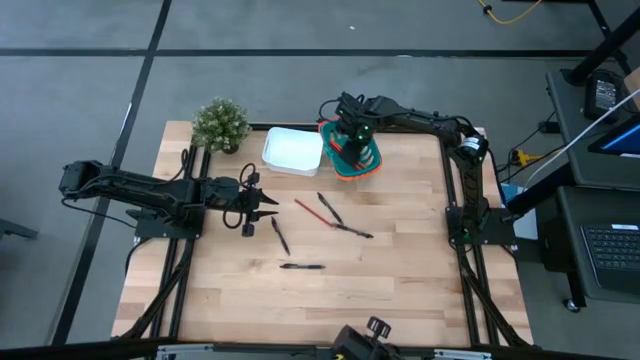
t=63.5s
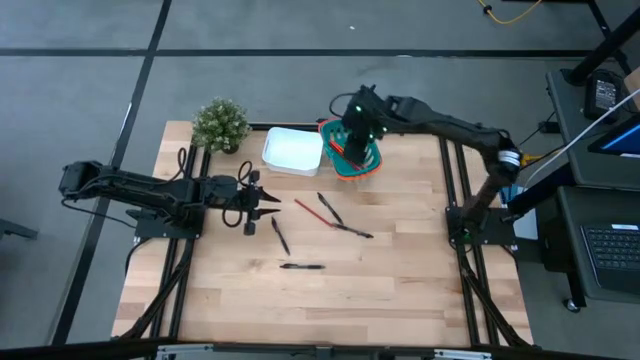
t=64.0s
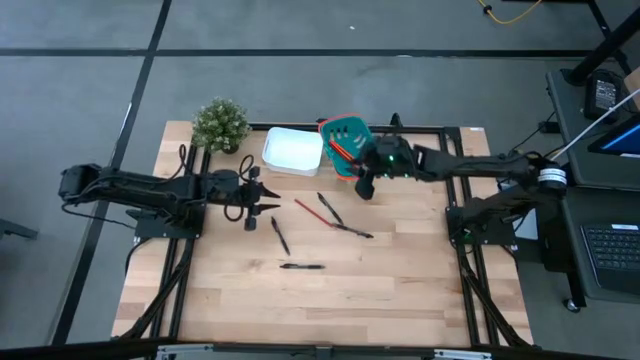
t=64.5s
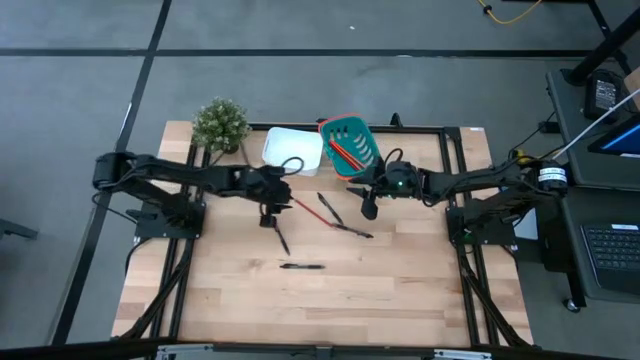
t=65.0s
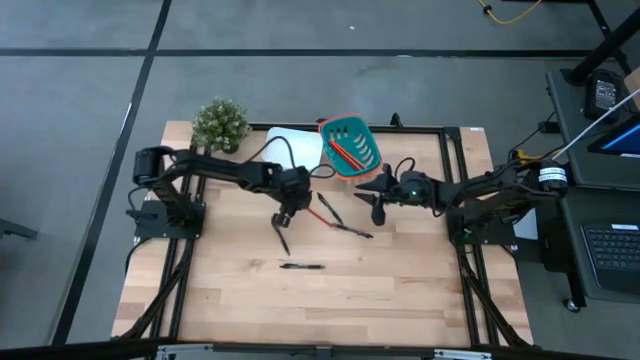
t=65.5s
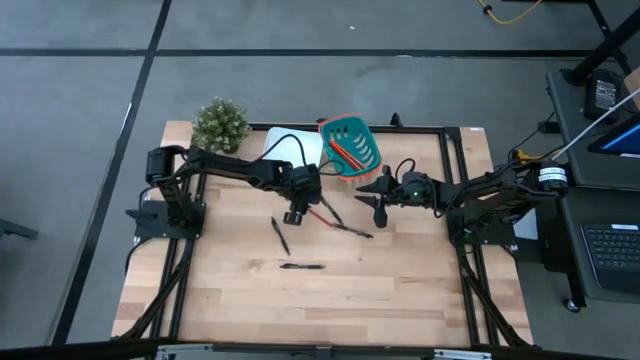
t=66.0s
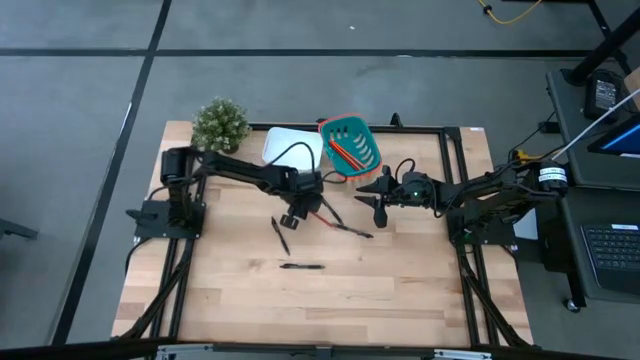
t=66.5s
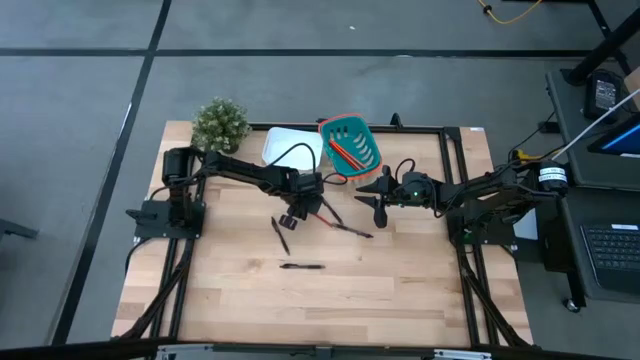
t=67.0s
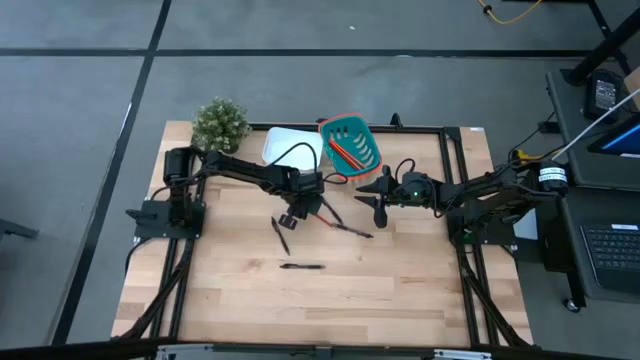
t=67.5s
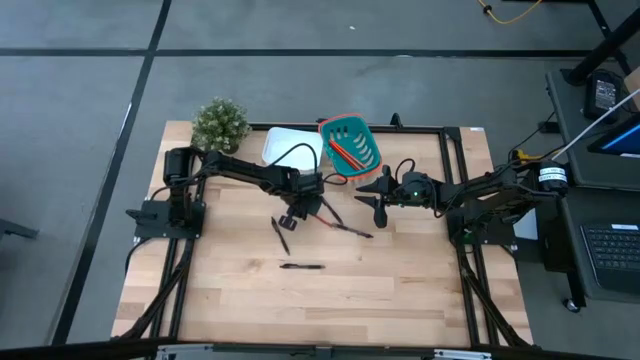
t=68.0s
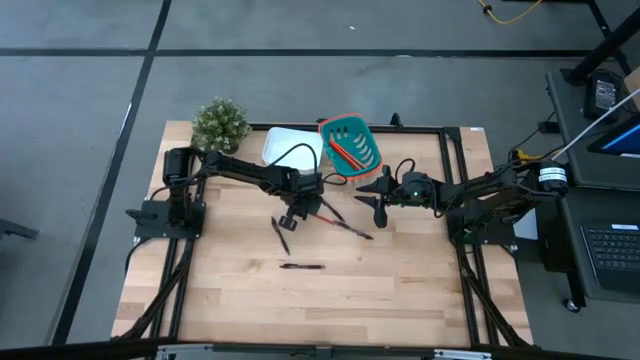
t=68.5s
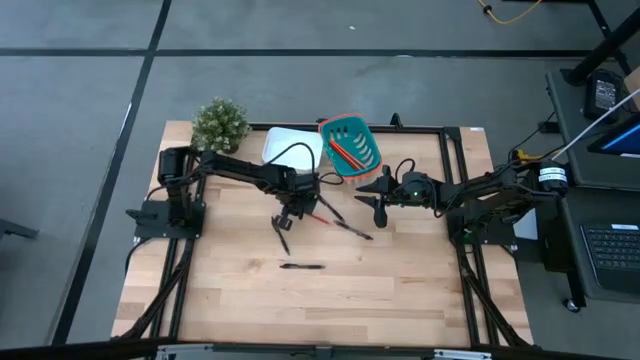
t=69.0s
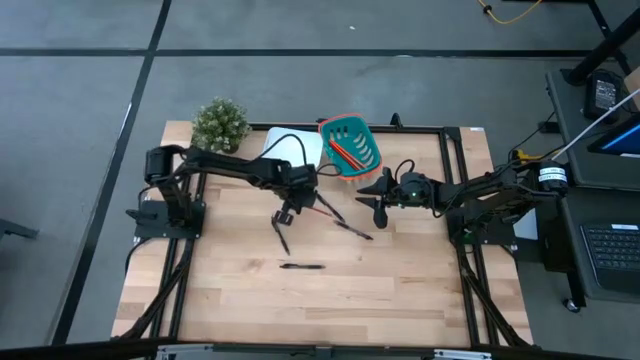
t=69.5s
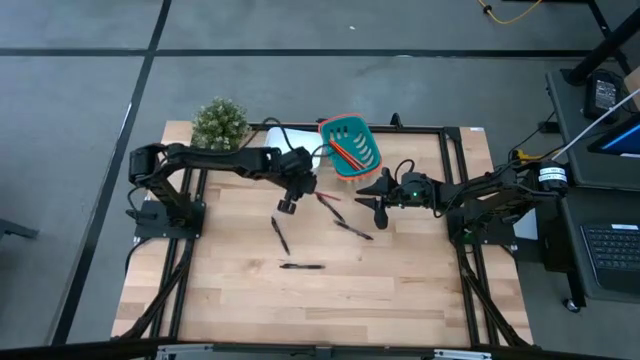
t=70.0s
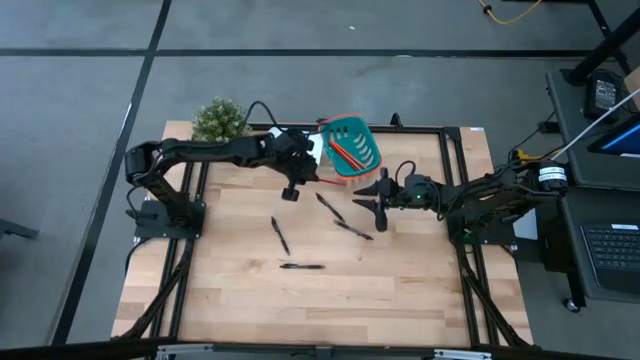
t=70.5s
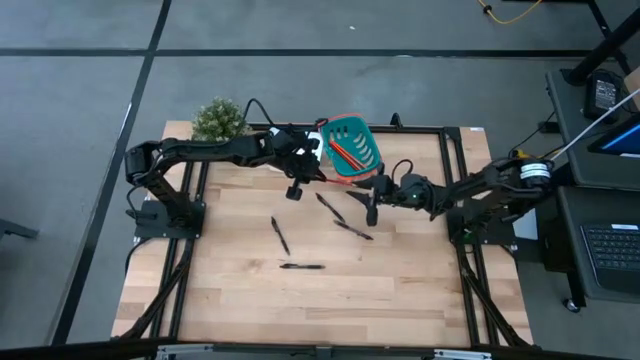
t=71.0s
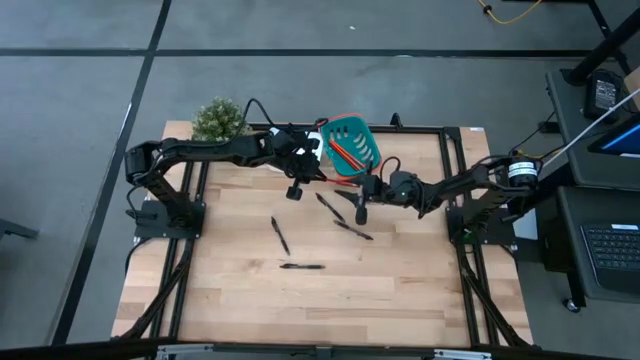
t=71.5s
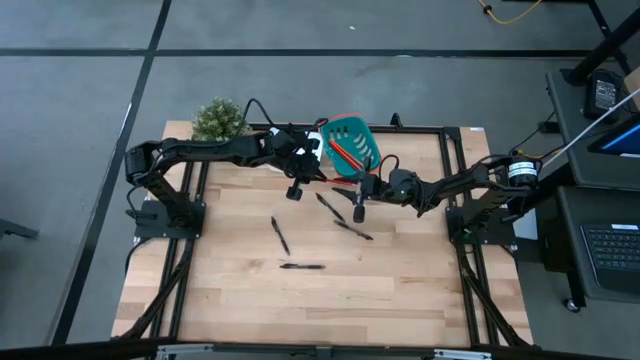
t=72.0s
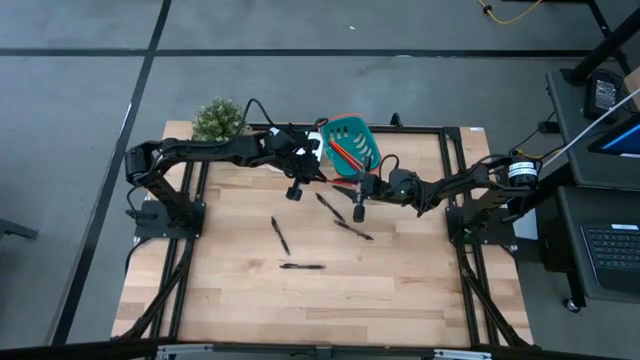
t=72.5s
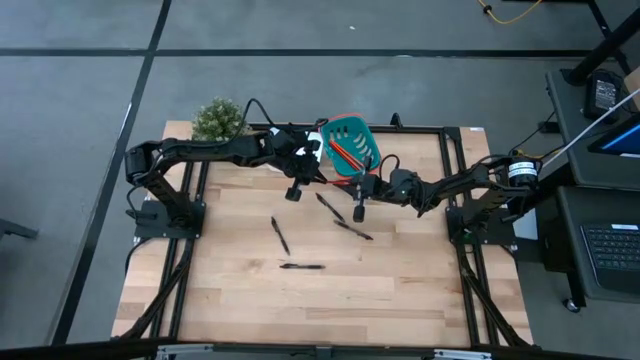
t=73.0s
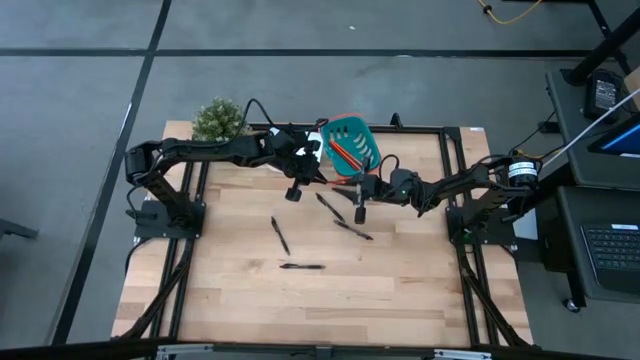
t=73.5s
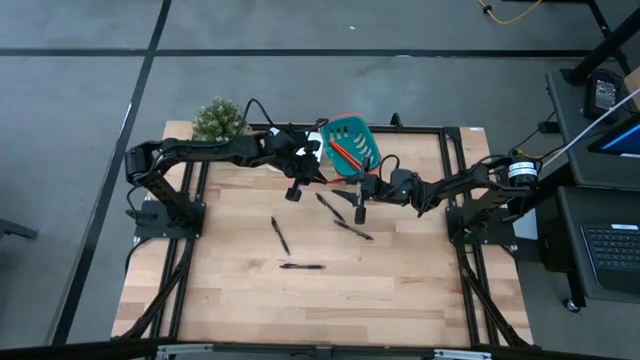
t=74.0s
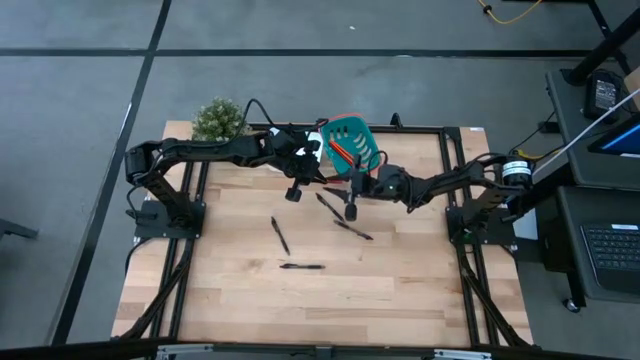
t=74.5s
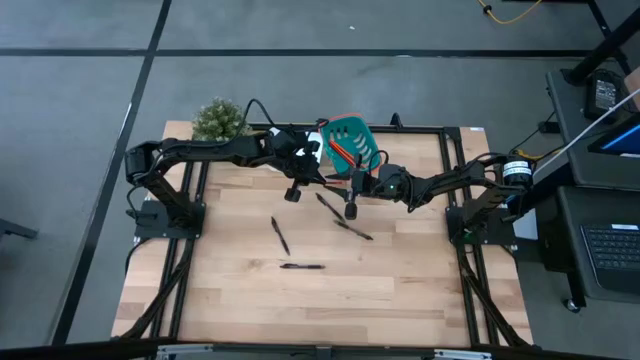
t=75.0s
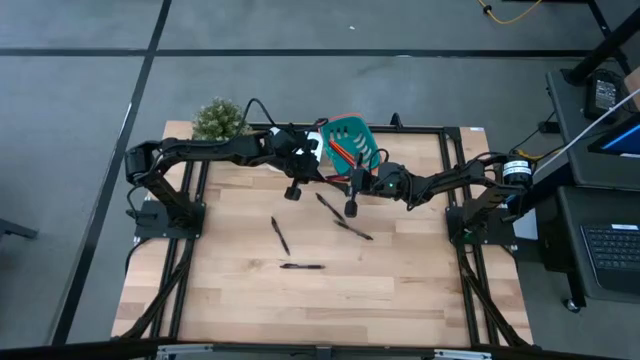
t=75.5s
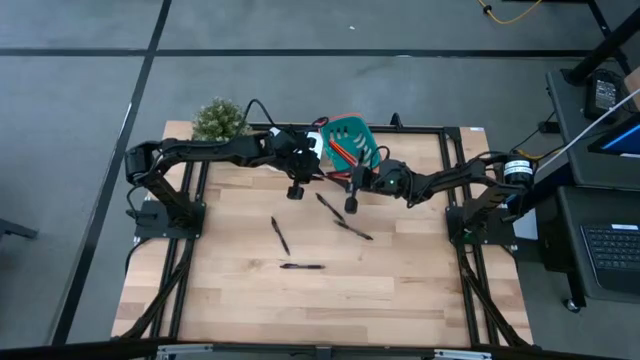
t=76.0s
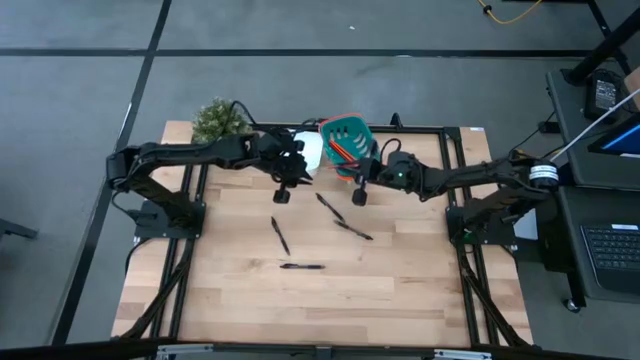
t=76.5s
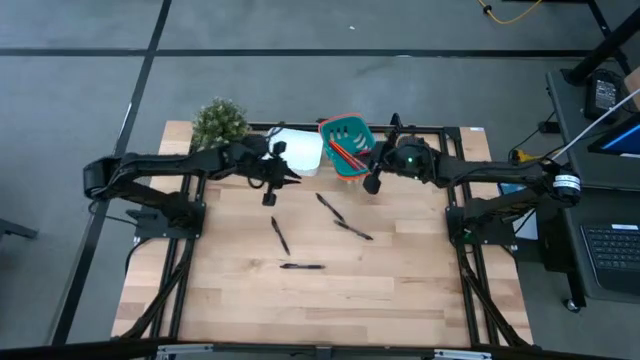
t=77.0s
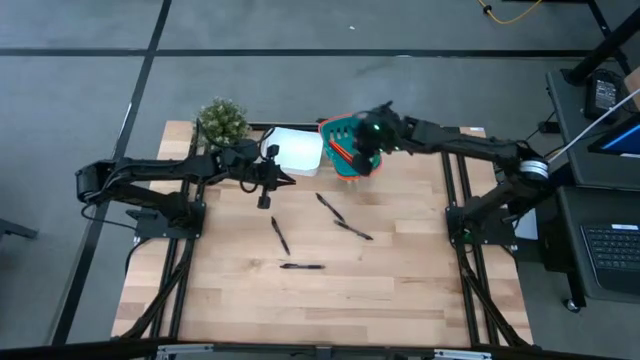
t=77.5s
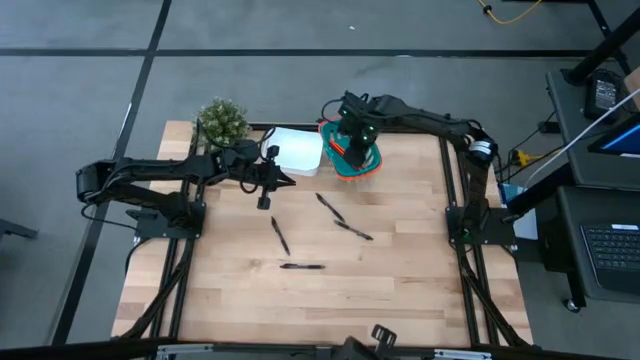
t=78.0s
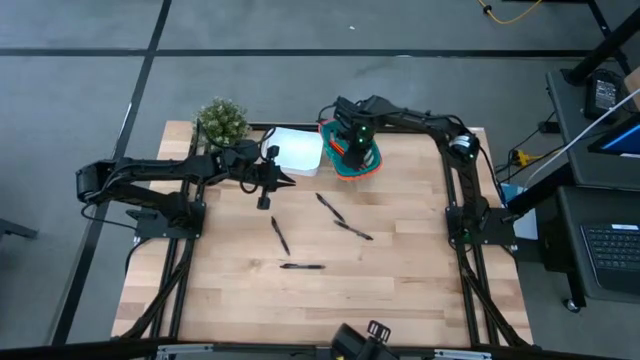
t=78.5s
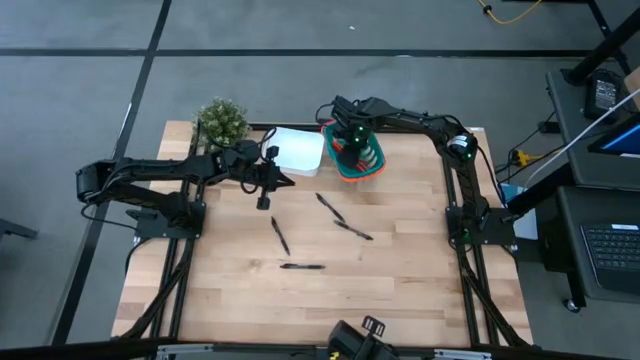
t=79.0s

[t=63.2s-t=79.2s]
Task: Sort pens & pencils
Put the red pencil into the dark green bin

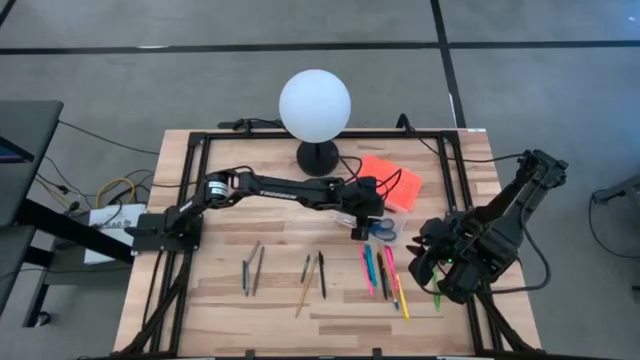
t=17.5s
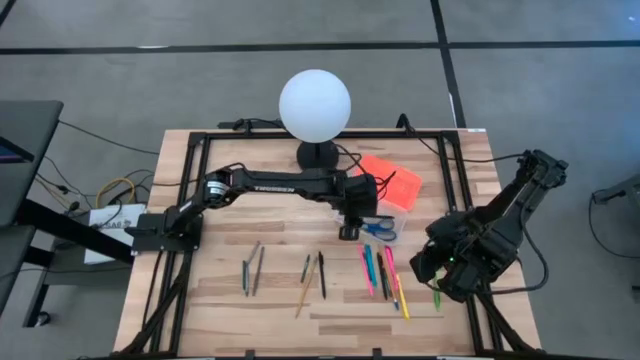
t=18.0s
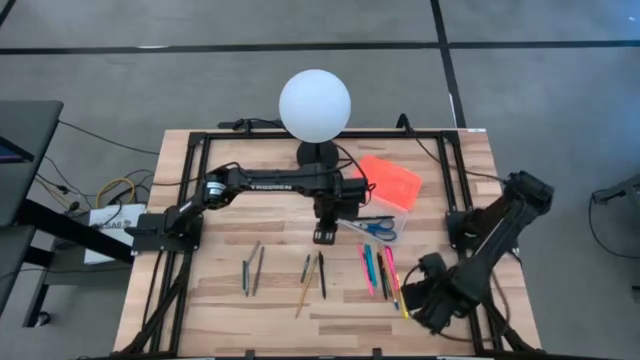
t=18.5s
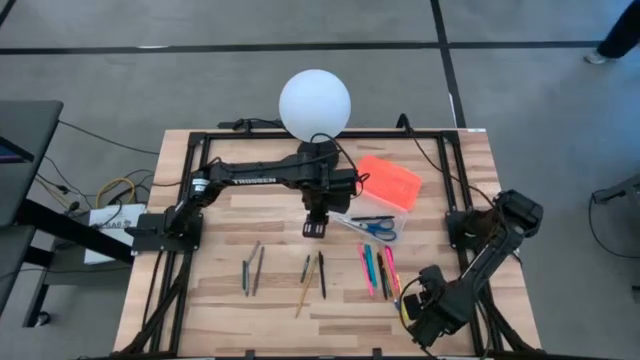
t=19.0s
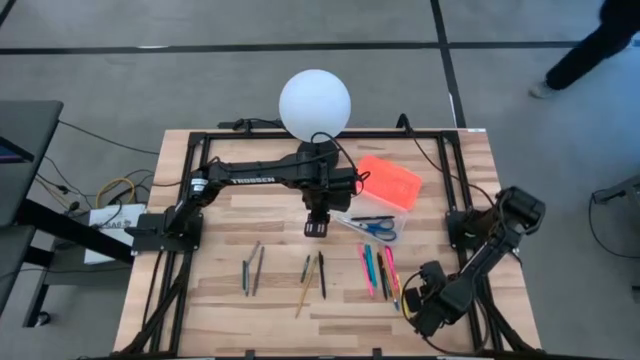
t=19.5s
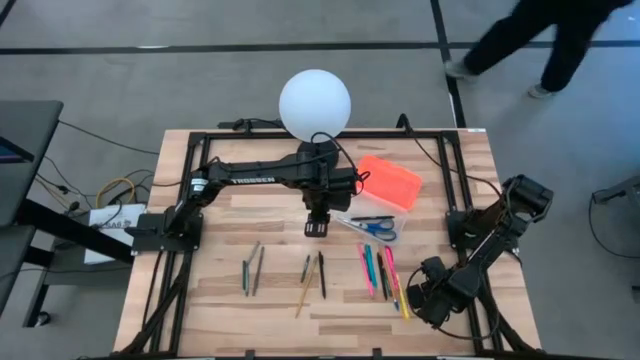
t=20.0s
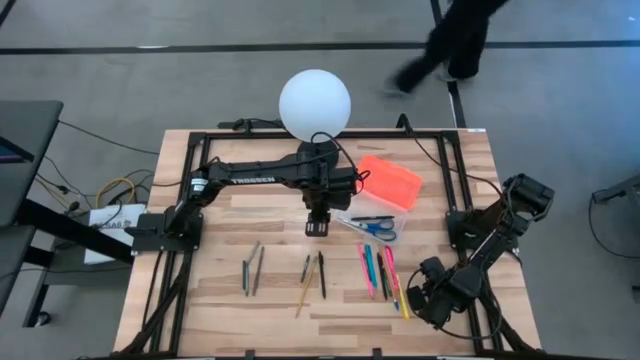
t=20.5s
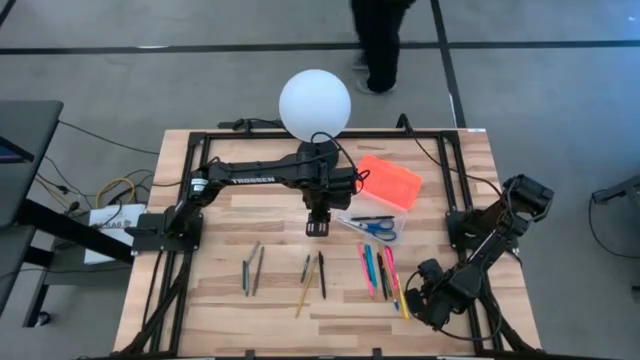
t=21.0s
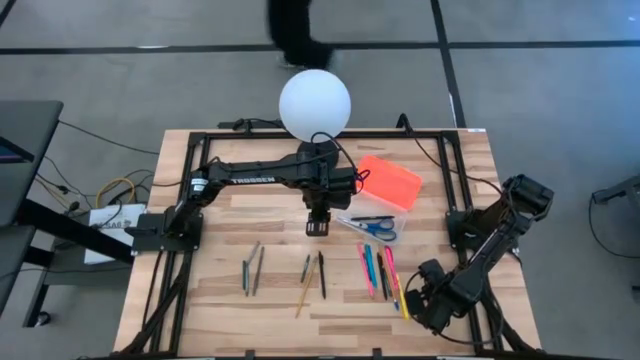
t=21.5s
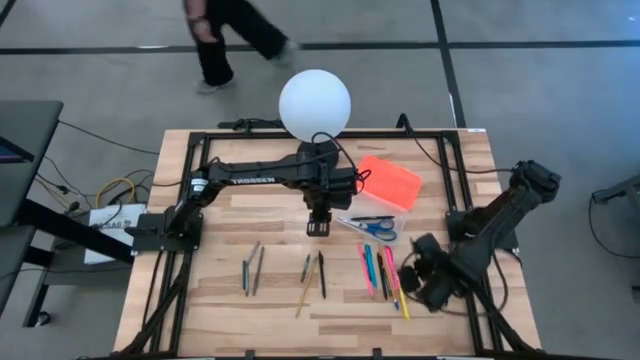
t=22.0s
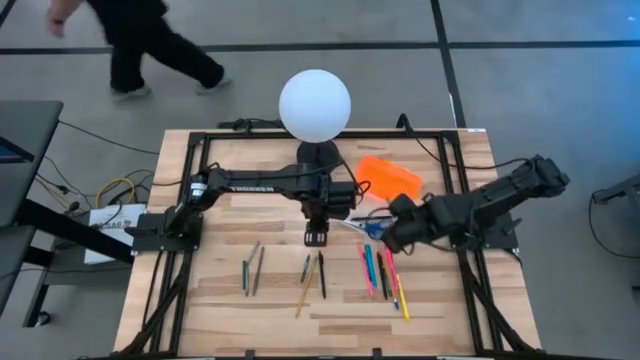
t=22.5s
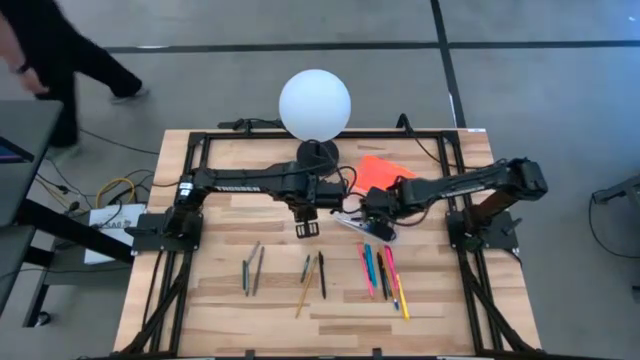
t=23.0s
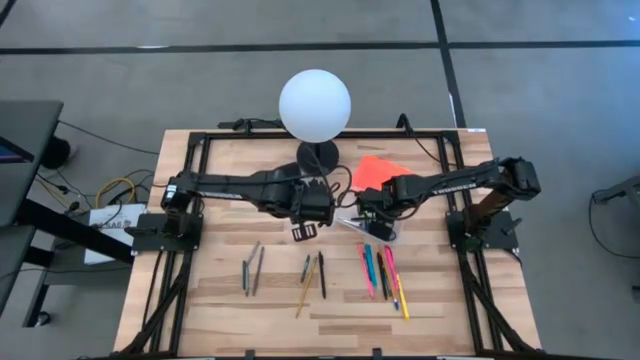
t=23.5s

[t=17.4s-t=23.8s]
Task: Pick & place school supplies into a supply box
Put the green pen into the orange supply box

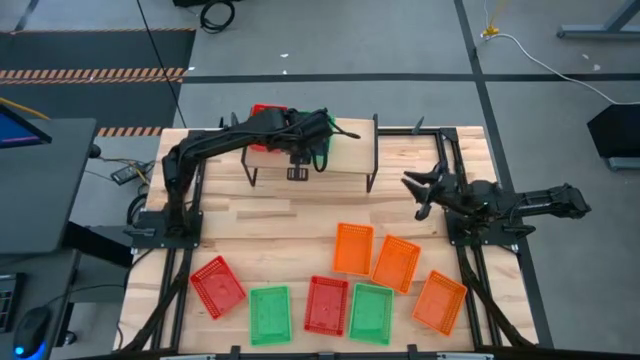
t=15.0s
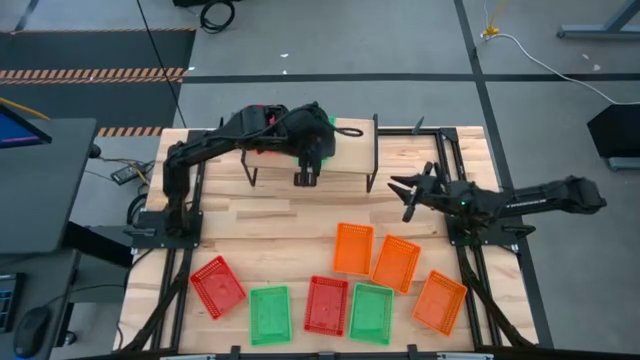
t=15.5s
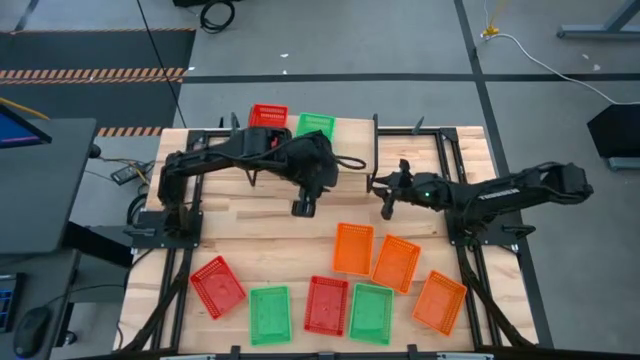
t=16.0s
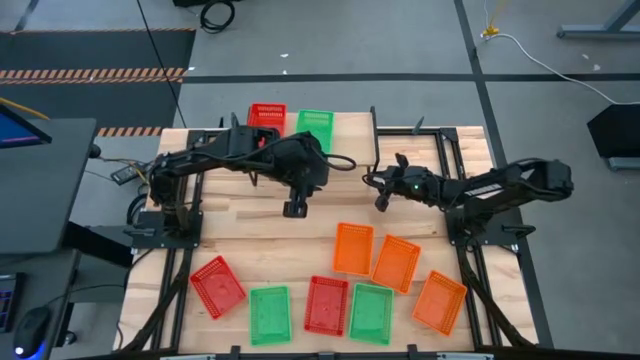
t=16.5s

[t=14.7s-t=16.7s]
Task: Stack baskets on shelf by color
Adjust the shelf
